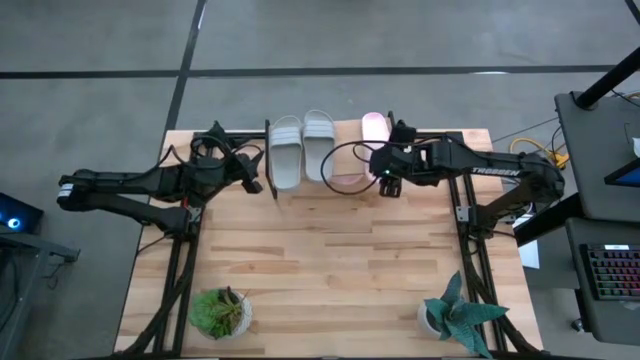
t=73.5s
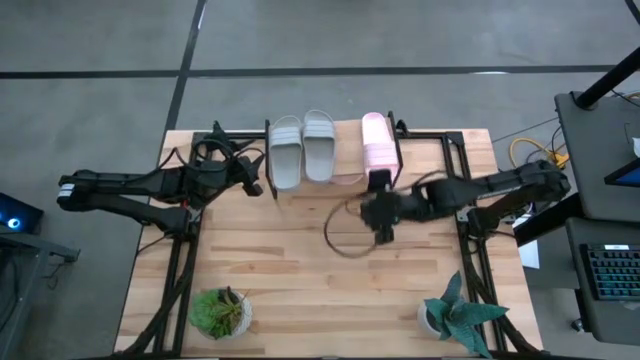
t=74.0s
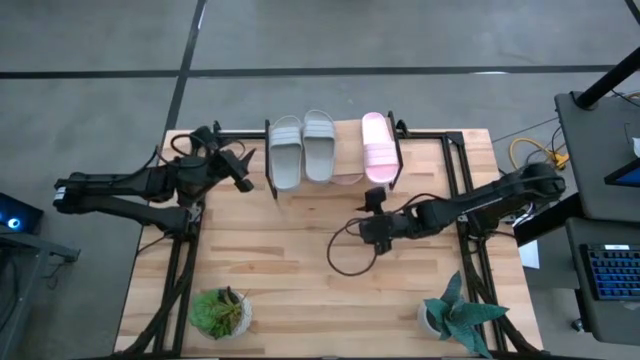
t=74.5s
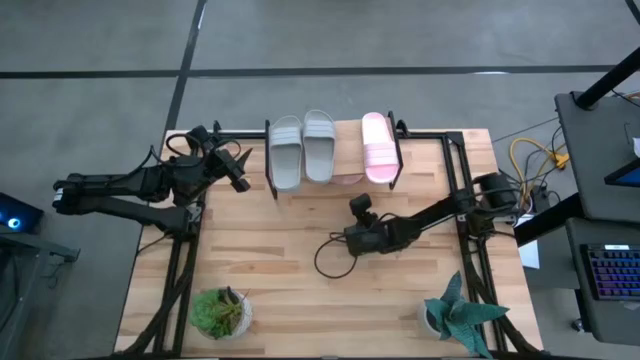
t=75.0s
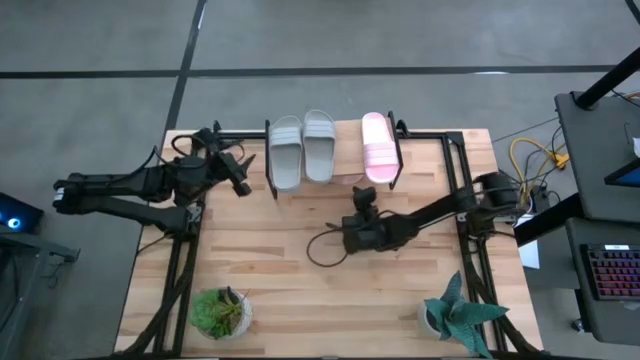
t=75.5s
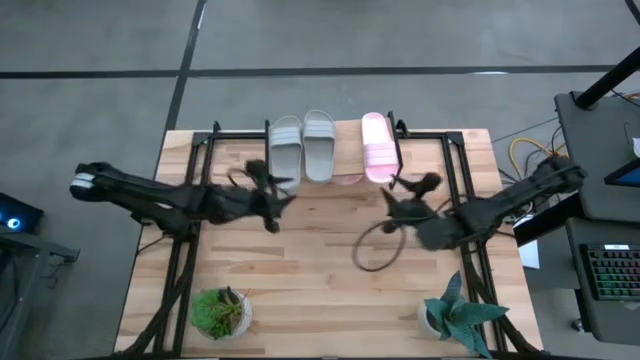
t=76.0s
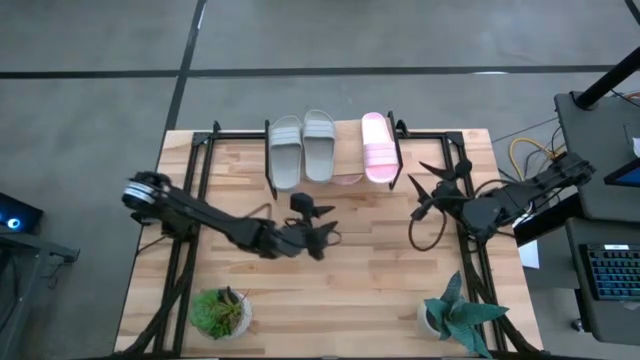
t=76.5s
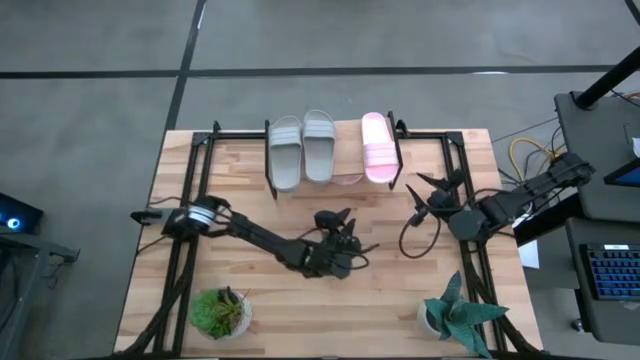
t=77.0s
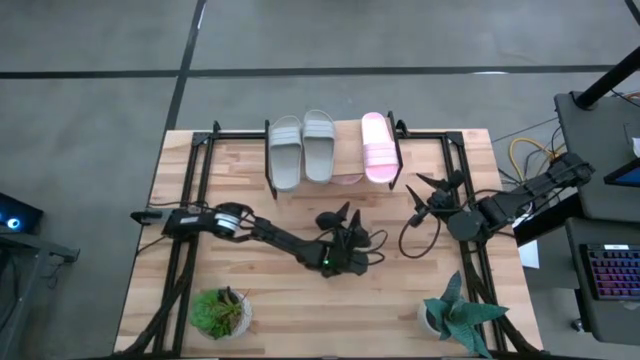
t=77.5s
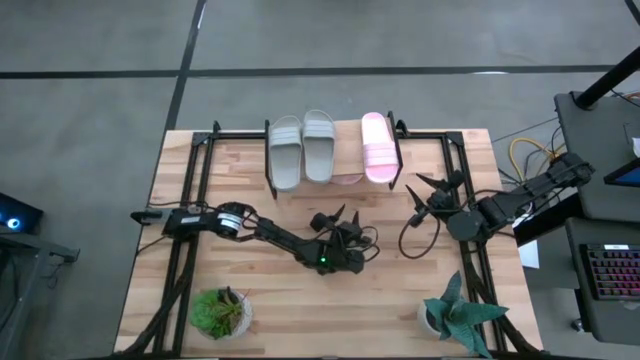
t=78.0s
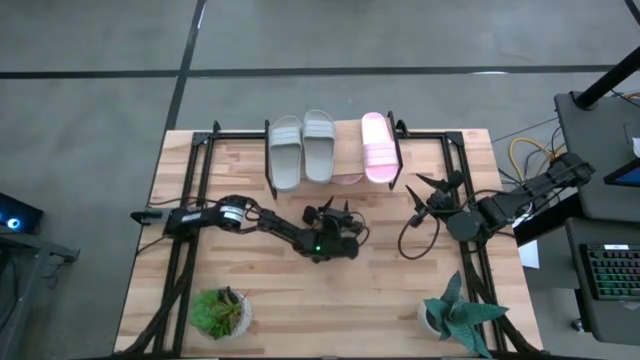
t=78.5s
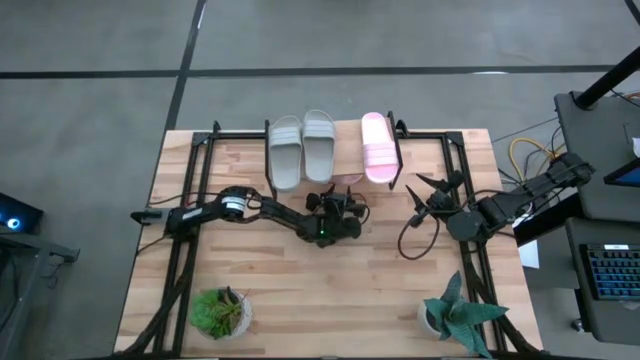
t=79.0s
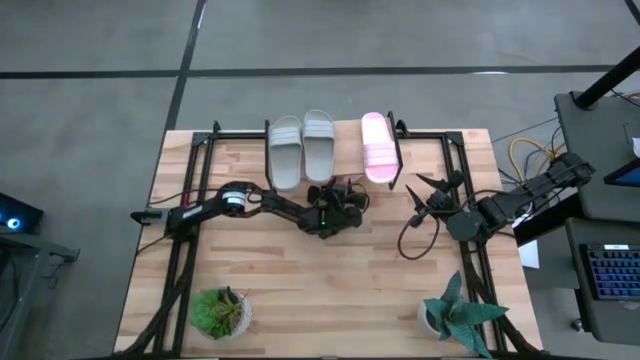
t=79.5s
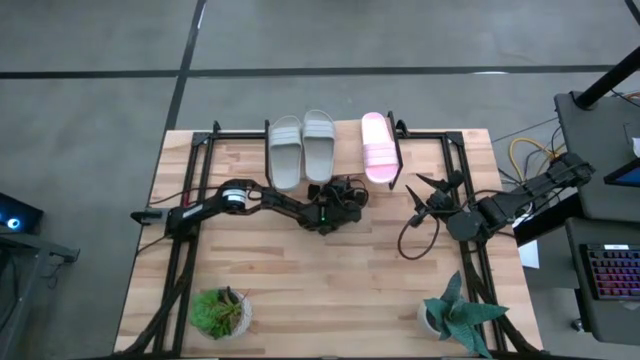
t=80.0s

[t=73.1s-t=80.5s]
Task: Pick and place slides into the shelf
Put the pink slipper on the shelf

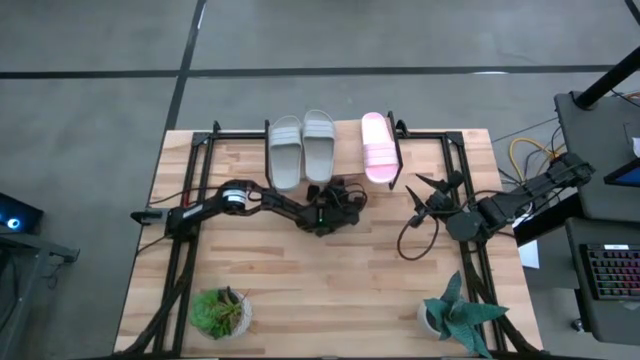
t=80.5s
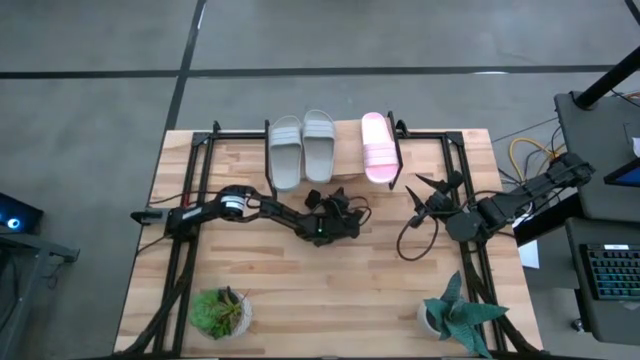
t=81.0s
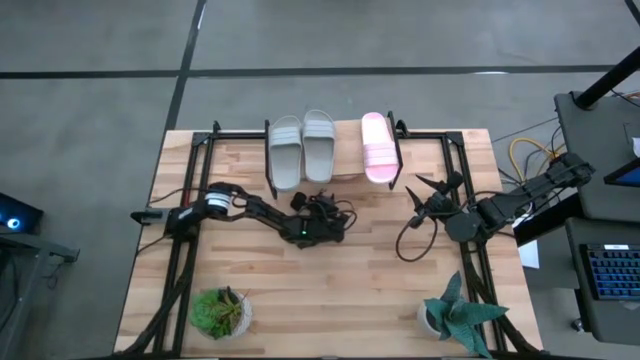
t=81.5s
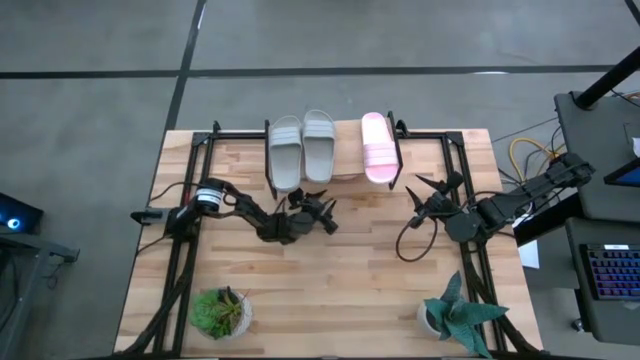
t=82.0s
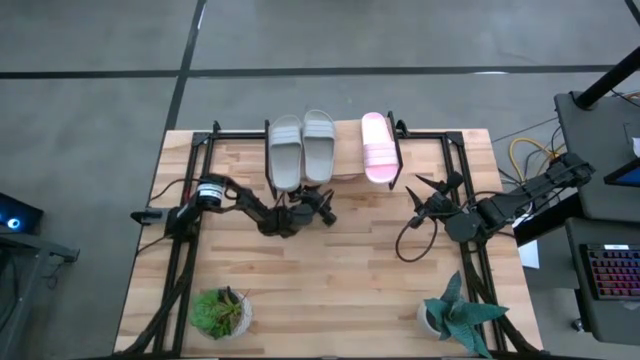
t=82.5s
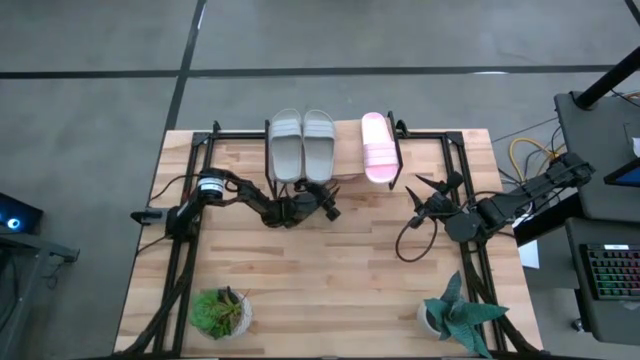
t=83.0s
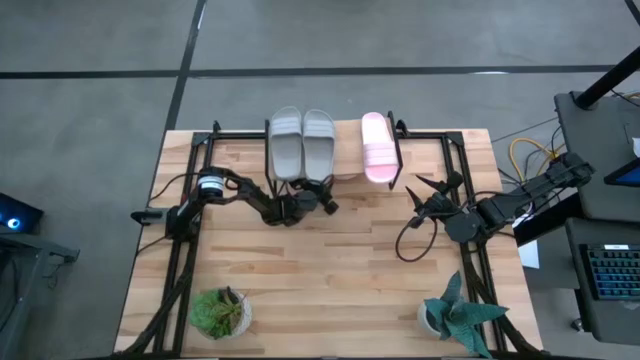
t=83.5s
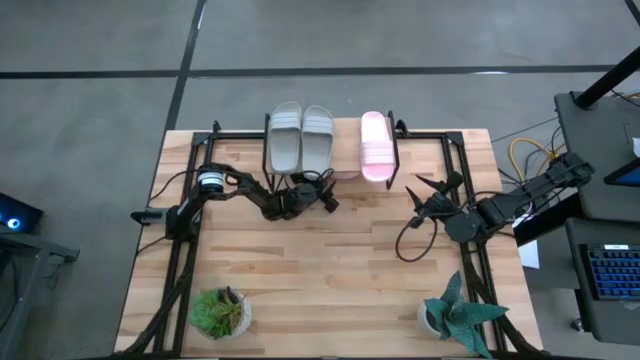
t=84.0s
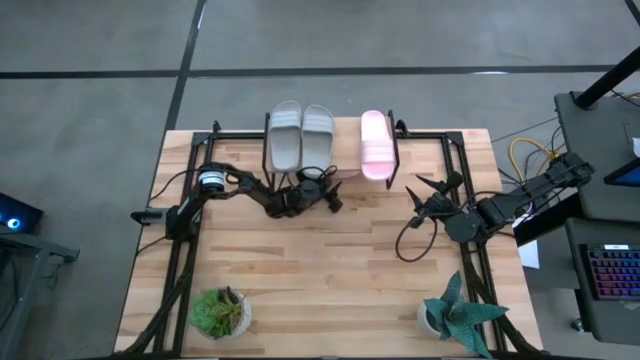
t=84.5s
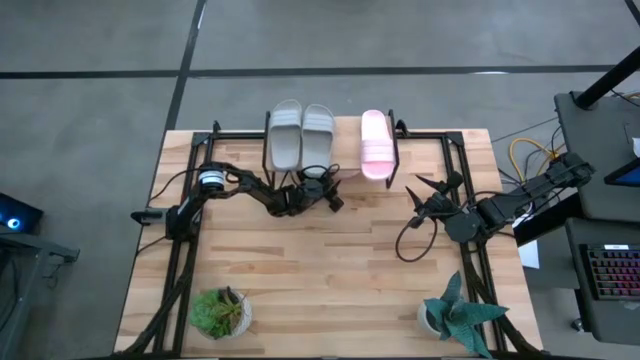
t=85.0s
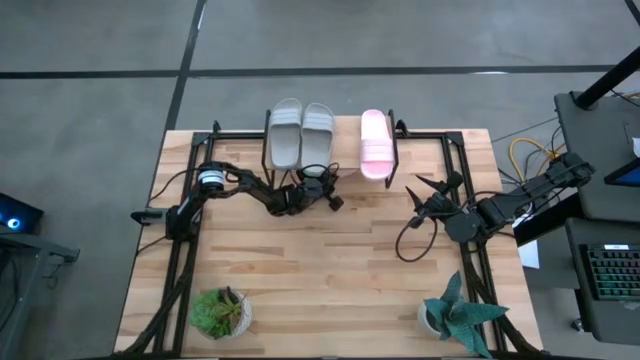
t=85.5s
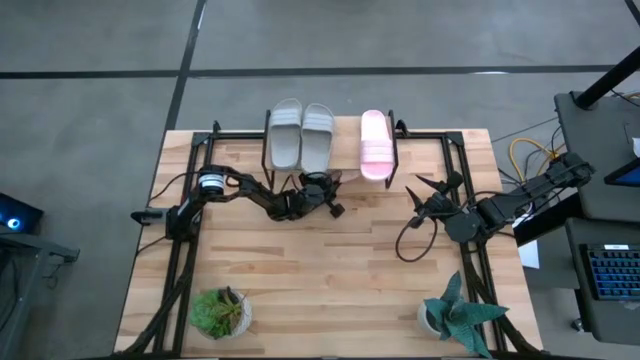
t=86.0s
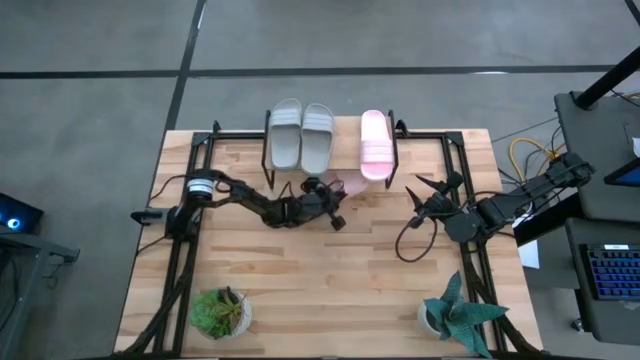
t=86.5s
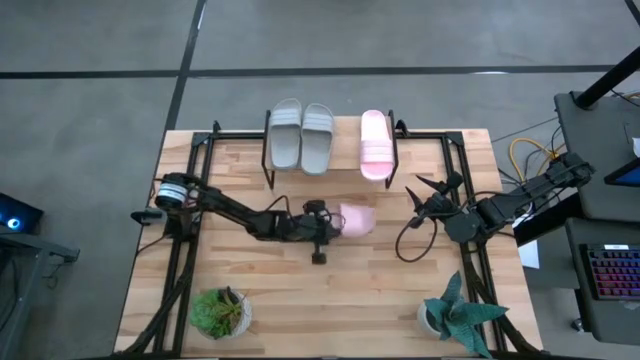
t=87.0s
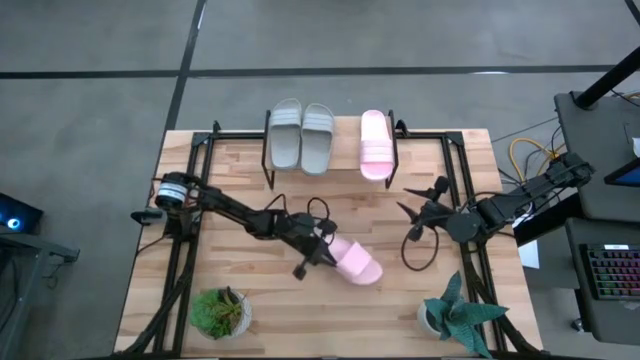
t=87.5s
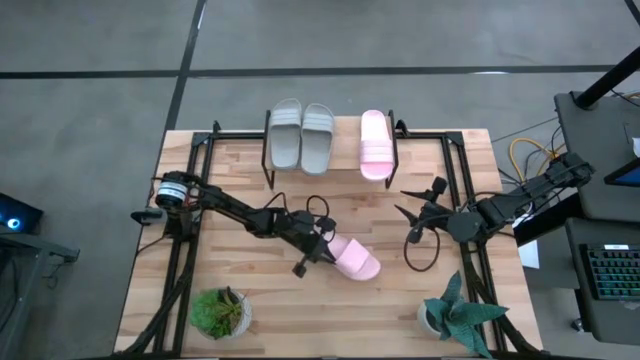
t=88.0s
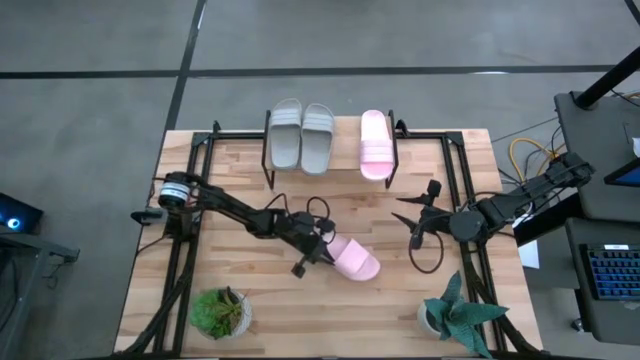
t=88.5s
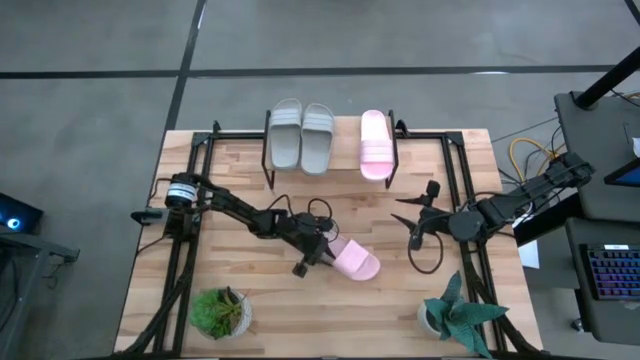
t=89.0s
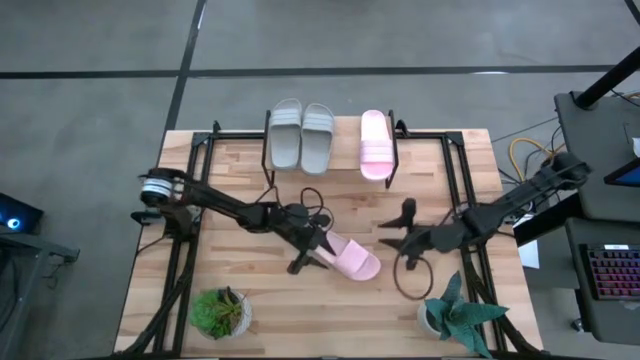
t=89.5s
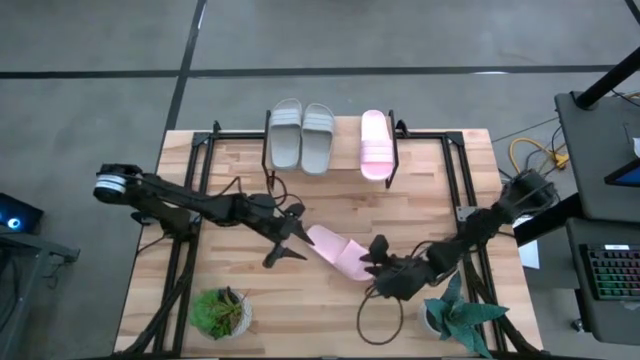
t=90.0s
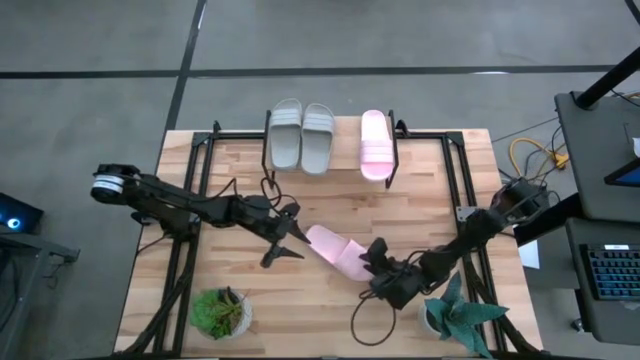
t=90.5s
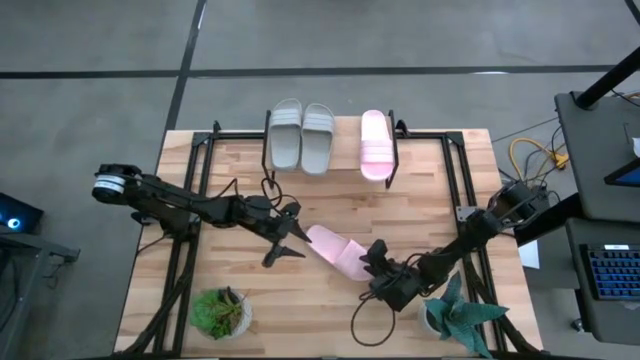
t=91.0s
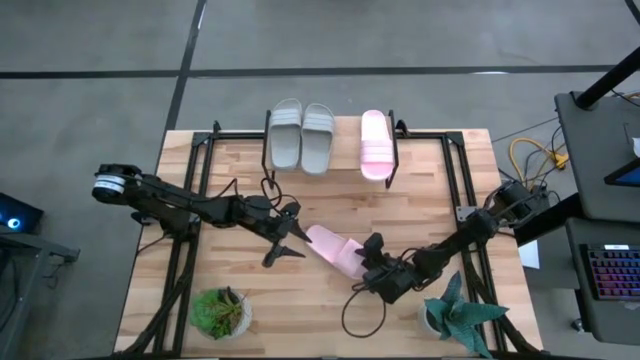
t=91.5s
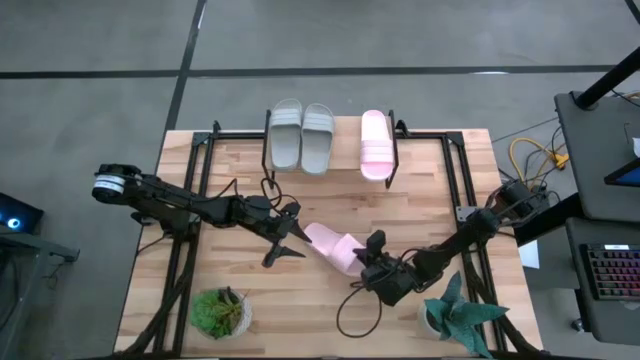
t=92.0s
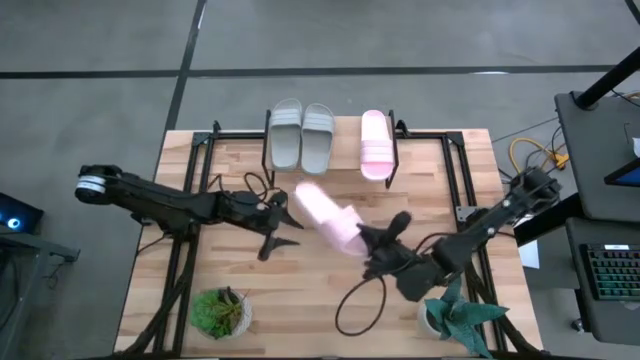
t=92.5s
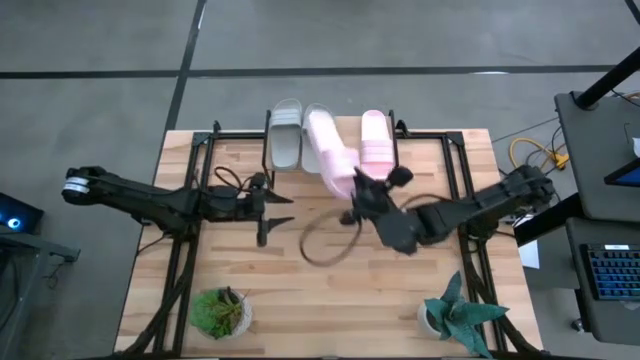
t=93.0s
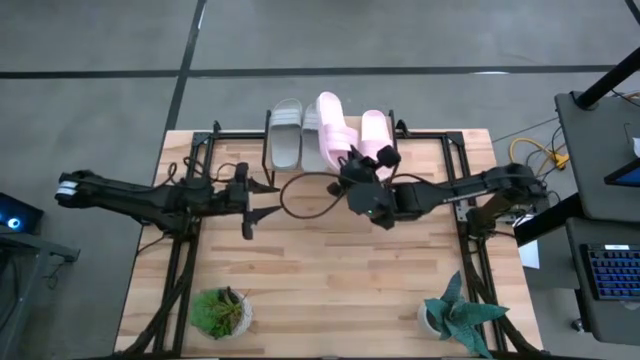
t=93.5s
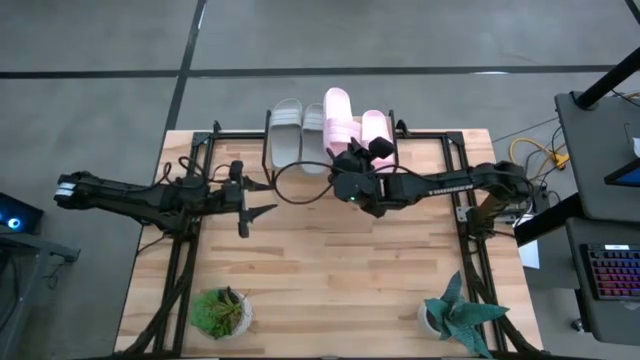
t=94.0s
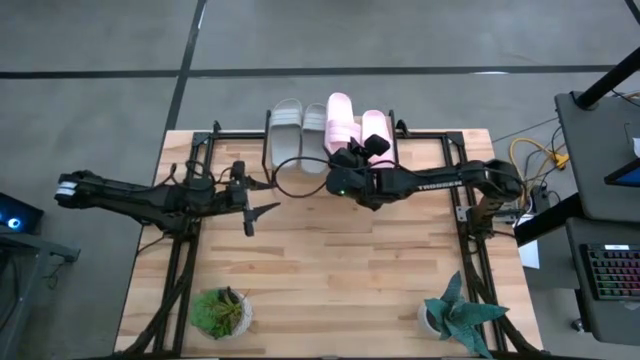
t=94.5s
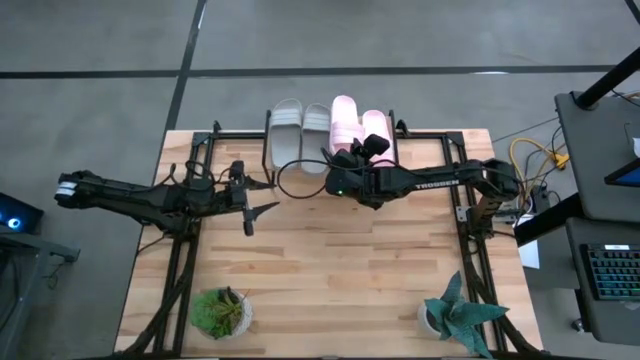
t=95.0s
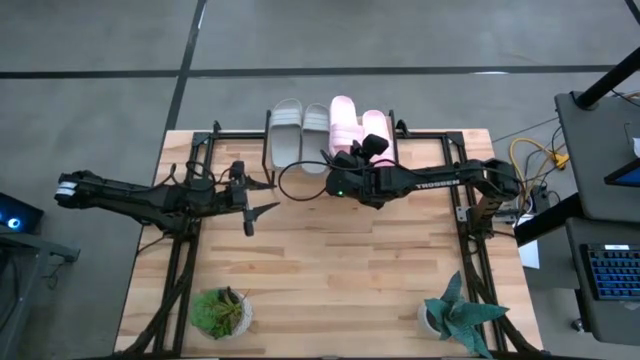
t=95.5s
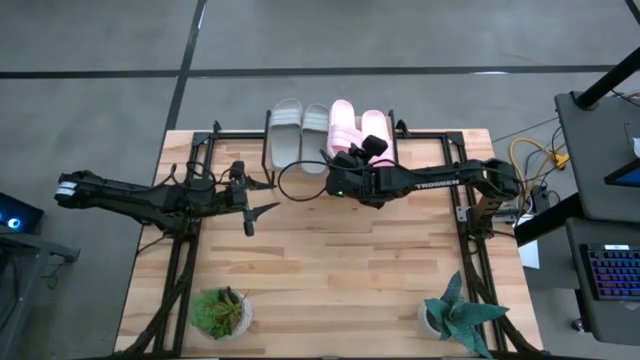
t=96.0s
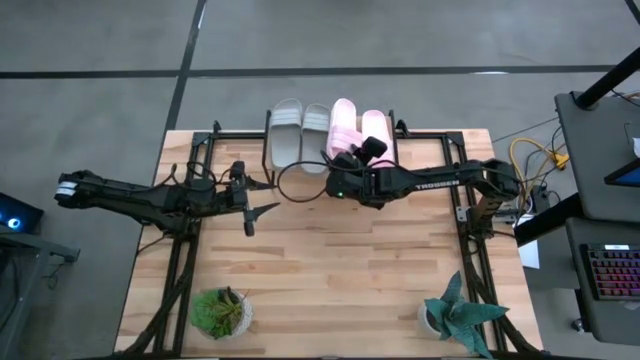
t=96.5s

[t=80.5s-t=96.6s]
Put the pink slipper on the shelf
